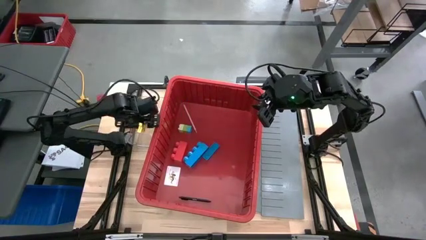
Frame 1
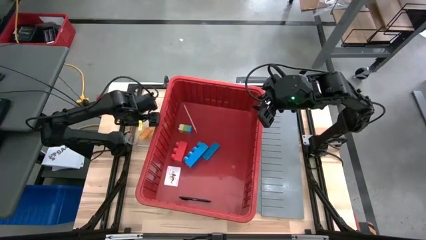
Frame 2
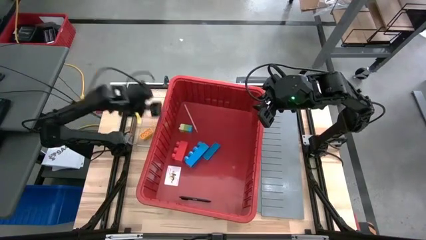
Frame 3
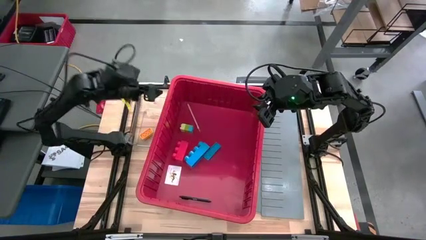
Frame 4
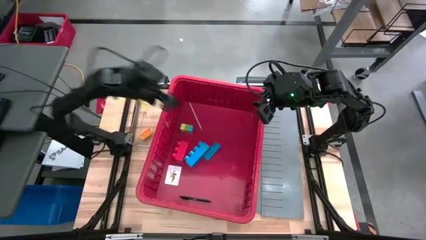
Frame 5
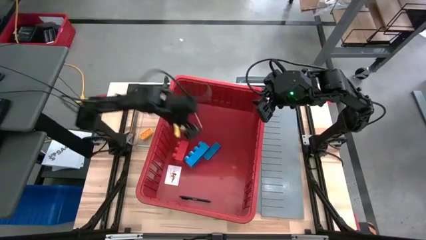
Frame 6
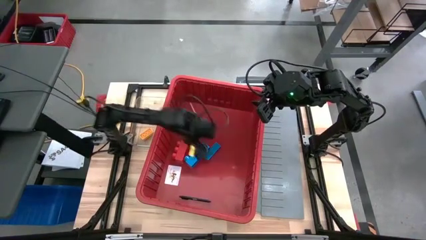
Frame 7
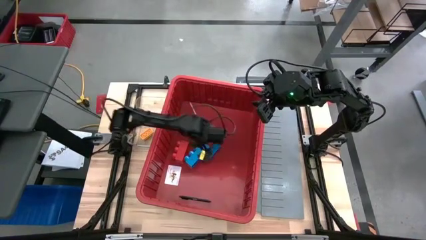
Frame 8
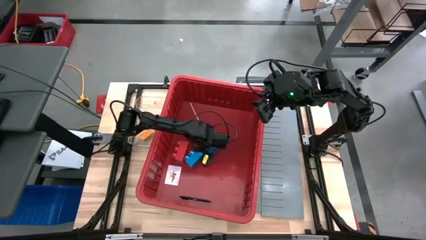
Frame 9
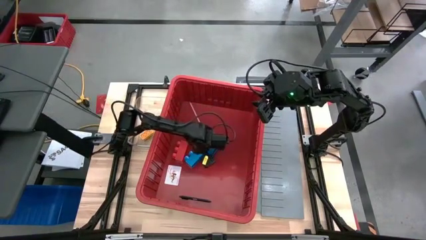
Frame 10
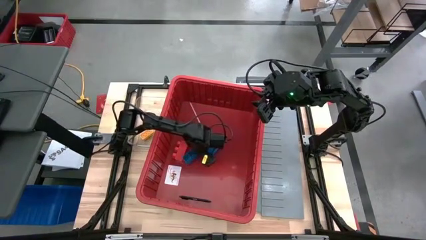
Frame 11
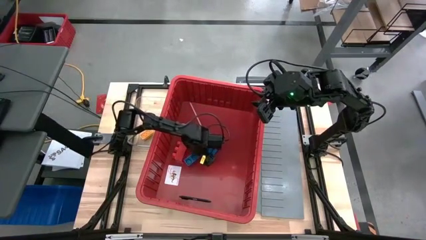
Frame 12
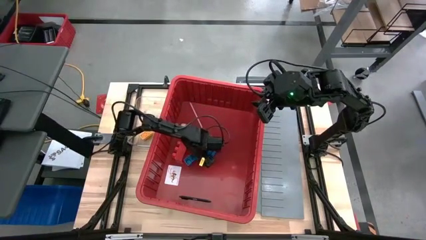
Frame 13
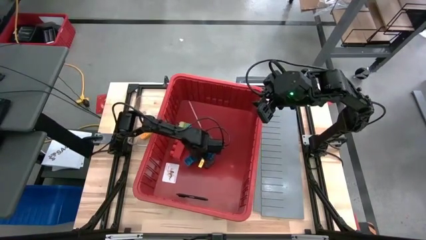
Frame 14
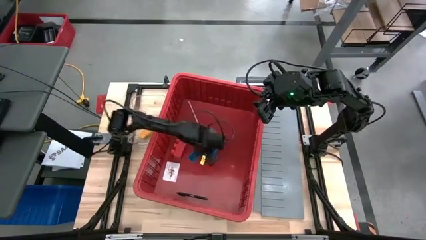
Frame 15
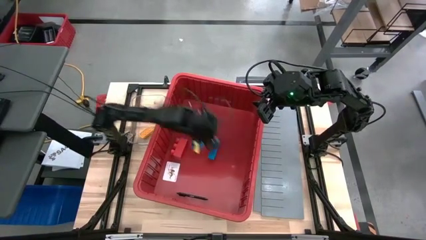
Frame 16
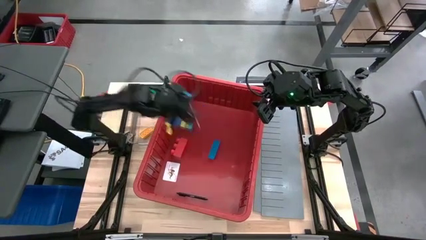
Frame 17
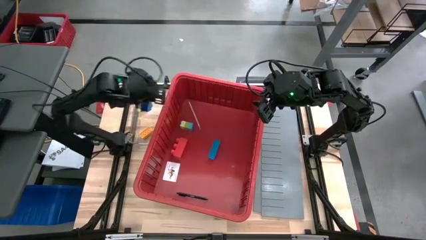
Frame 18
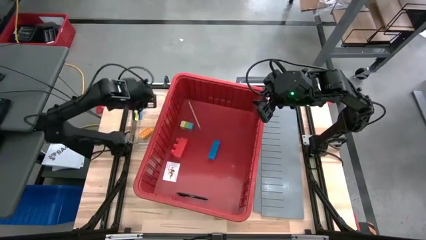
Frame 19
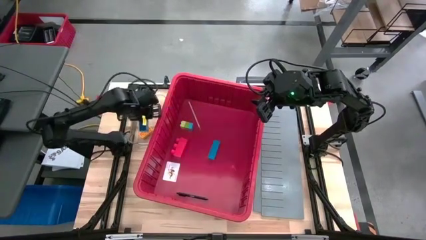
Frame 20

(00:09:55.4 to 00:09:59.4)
Task: Sort blocks
Remove the blue block from the bin

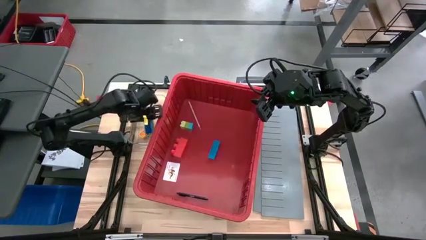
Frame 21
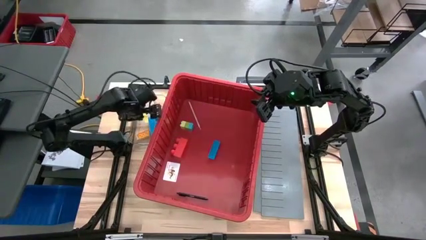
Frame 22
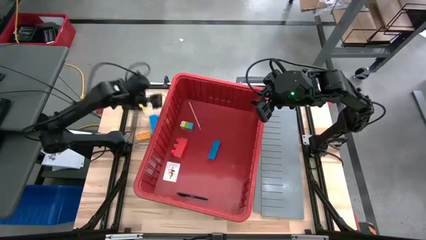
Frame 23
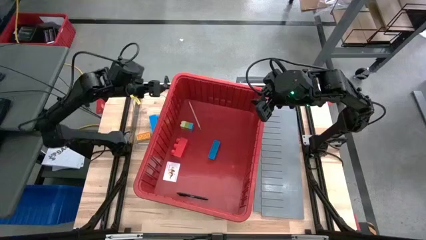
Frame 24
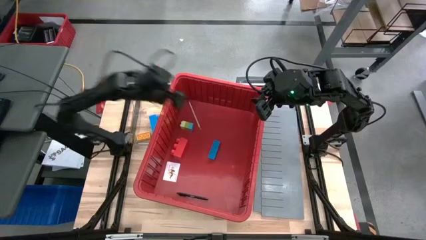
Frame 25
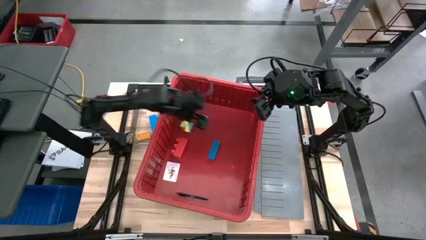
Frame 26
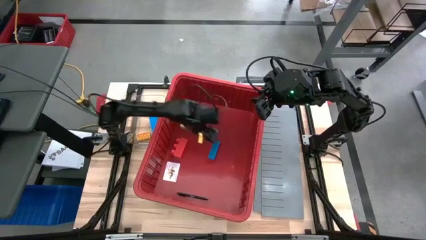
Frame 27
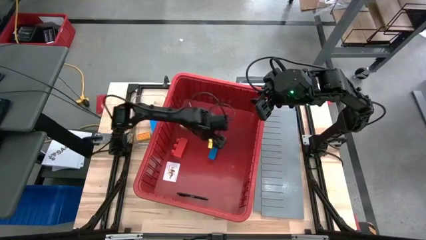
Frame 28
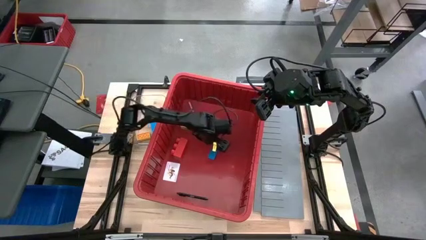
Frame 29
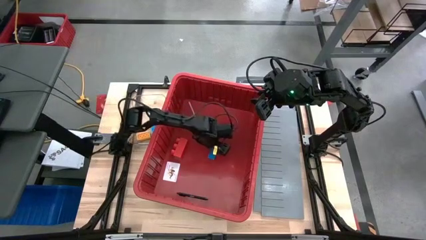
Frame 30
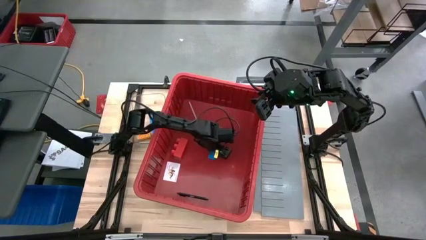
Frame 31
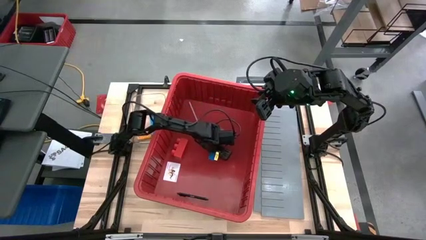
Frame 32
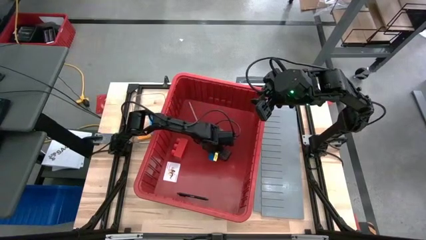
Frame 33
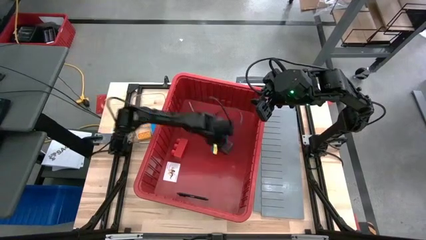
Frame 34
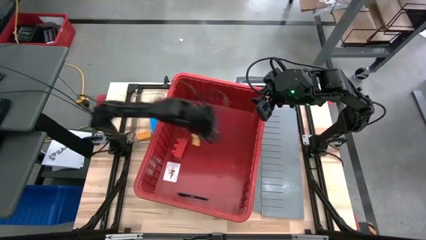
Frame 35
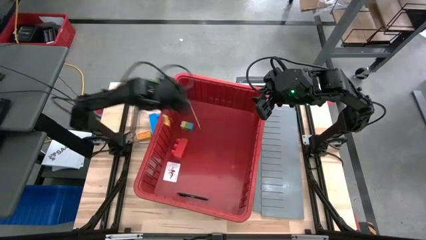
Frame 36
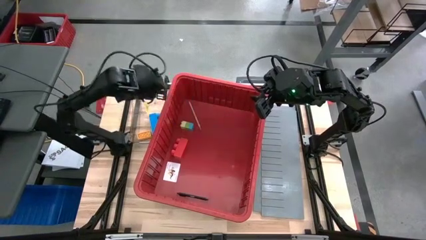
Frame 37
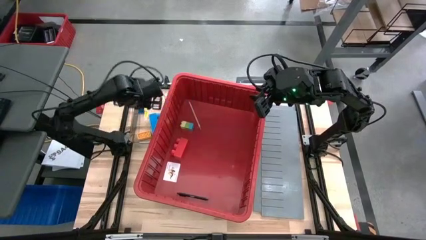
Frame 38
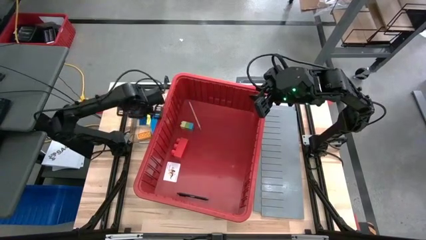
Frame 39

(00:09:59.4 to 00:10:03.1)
Remove the blue block from the bin

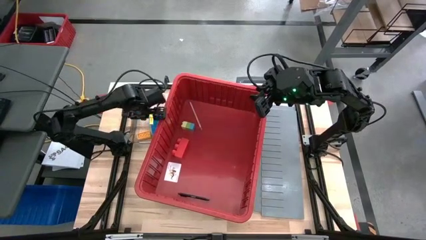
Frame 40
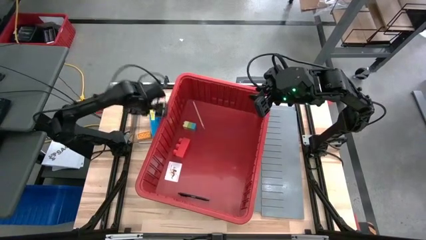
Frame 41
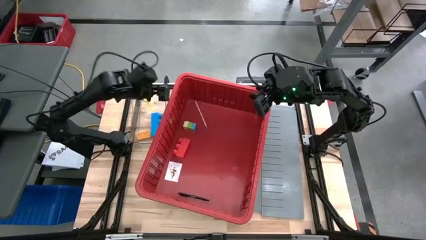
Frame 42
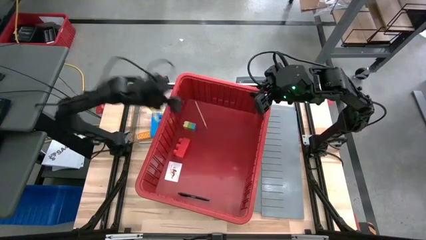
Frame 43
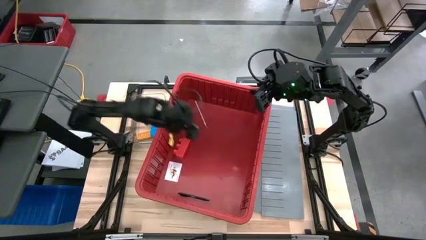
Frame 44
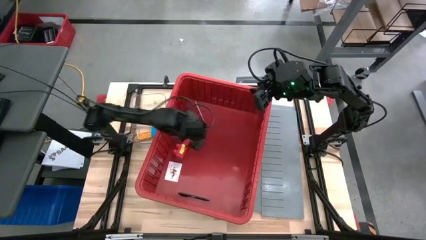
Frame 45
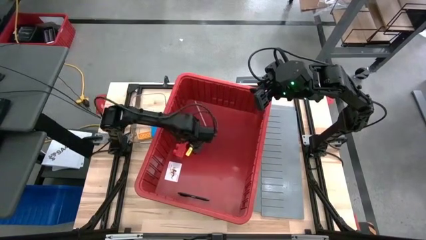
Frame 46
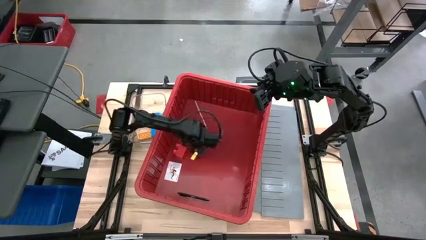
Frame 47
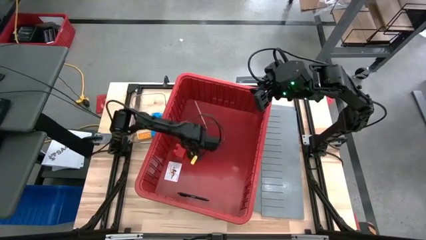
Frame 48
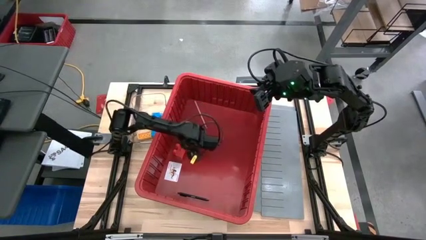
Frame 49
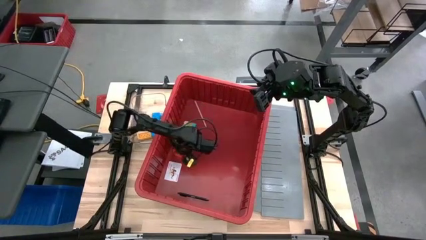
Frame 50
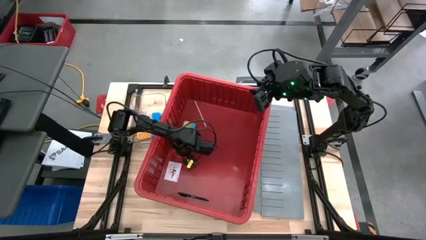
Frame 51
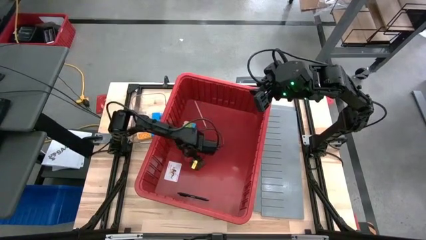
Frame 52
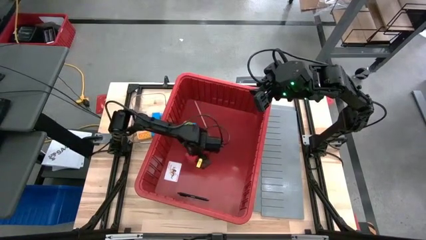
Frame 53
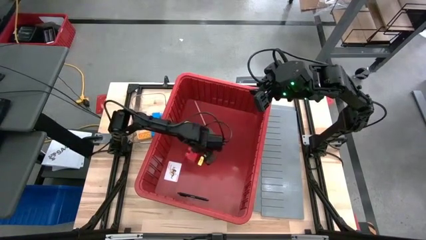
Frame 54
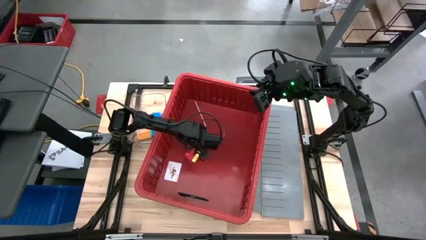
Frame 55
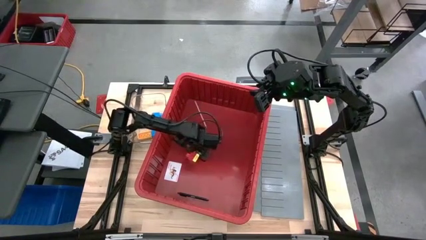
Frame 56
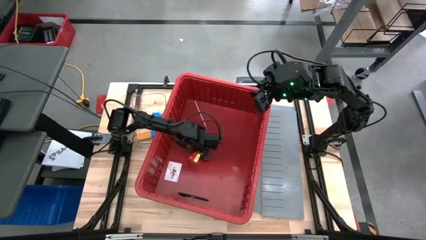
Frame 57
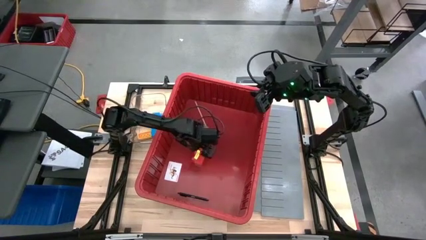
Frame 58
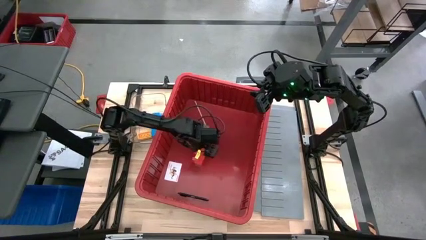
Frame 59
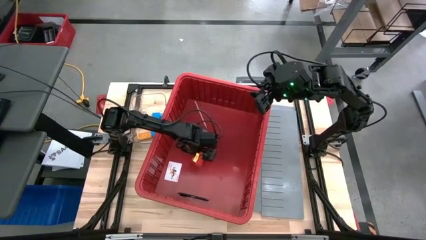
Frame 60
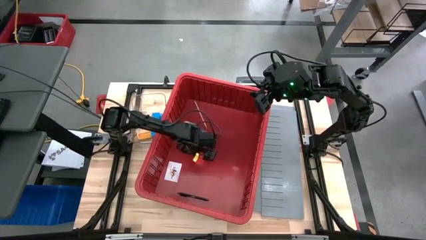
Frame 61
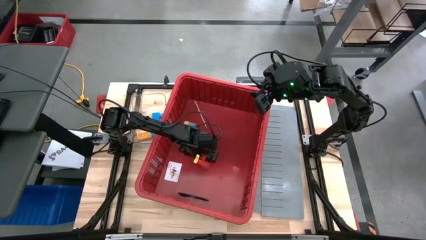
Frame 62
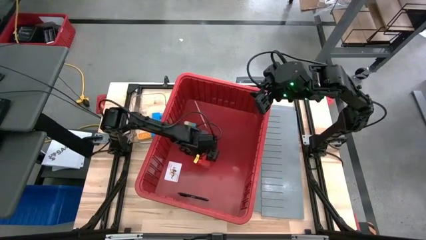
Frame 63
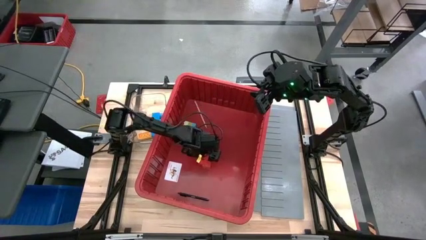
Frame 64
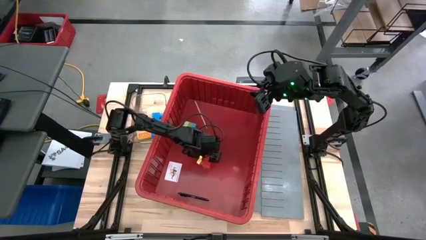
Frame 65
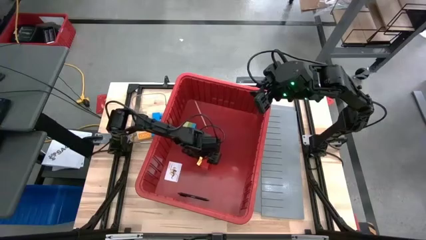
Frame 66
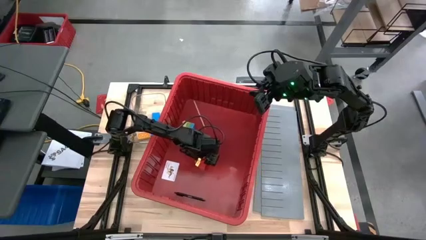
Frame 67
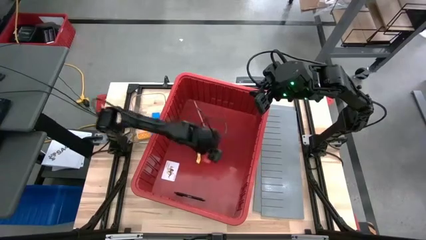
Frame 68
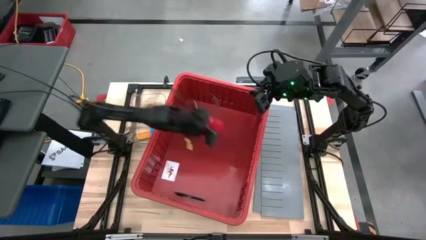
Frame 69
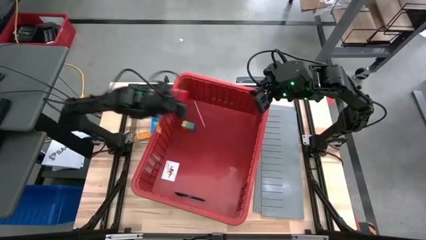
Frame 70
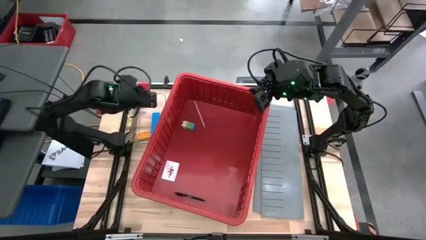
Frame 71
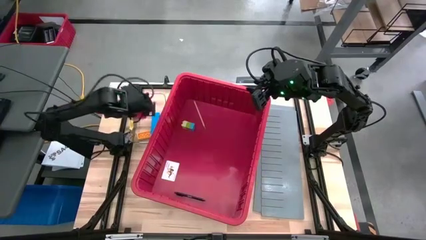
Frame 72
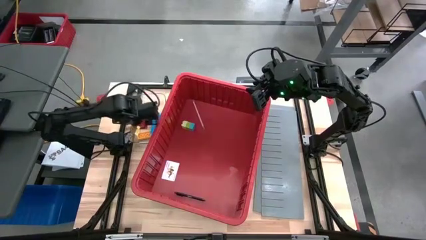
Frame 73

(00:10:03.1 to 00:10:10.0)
Remove the orange block from the bin

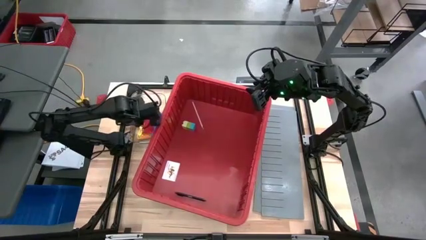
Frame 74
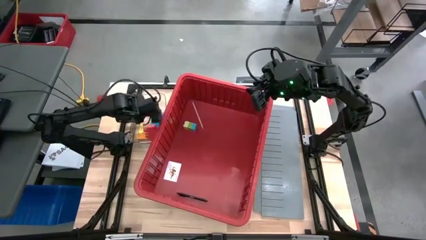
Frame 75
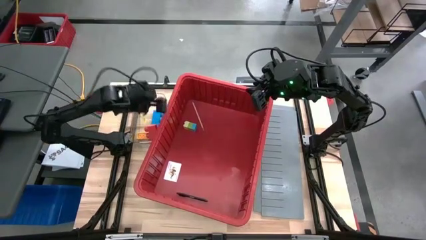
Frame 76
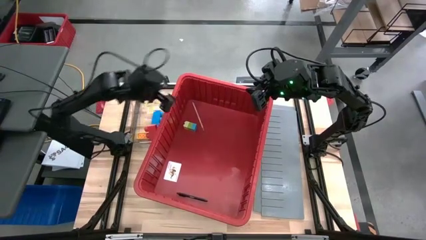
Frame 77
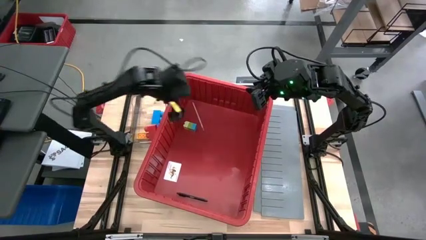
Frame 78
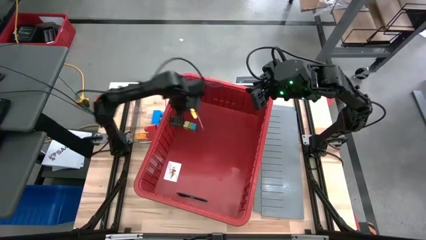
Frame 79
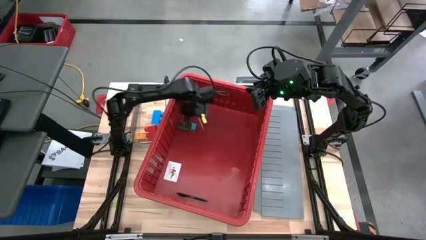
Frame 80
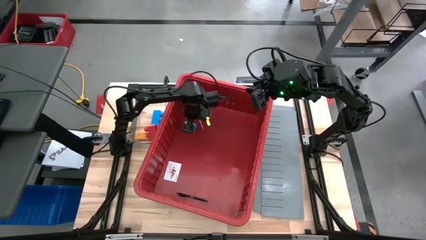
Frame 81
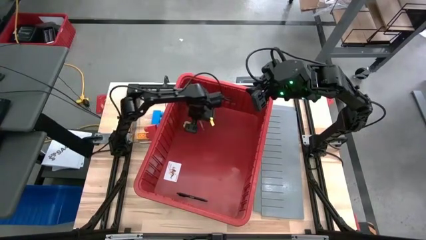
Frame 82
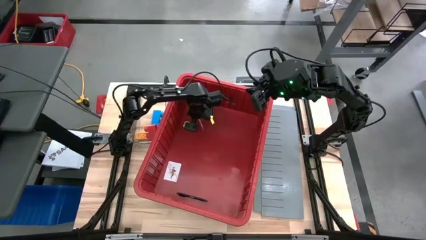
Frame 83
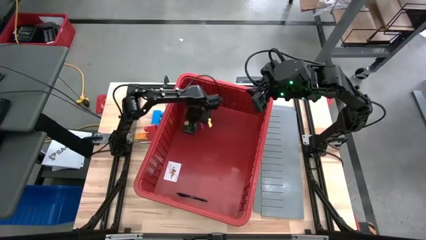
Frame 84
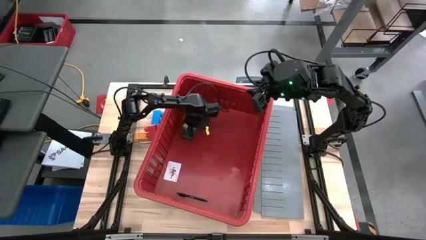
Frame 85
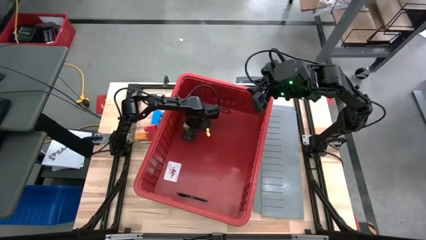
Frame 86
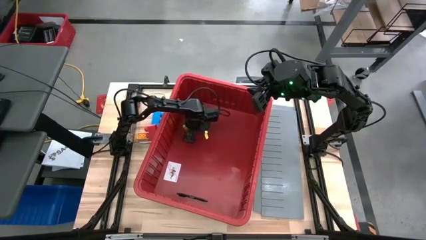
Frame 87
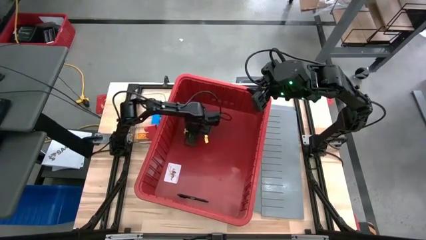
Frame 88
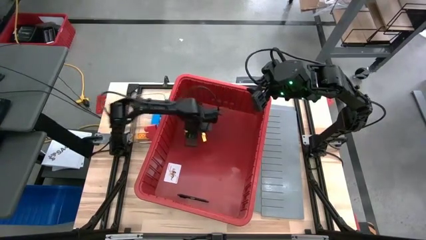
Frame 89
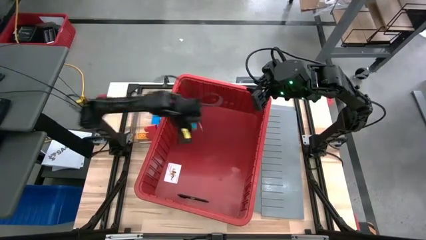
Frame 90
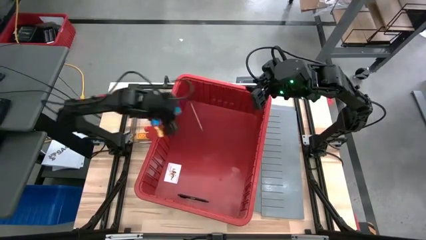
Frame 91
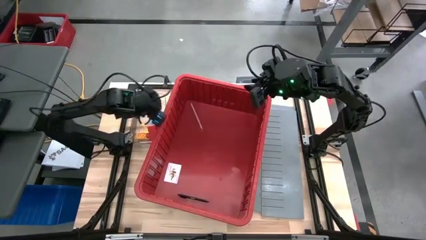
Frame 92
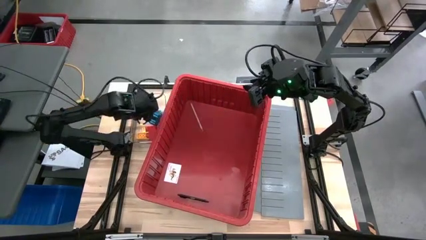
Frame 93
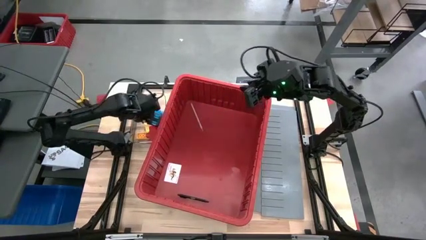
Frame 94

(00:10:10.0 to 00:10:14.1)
Remove the green block from the bin
